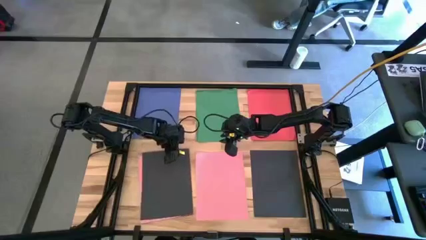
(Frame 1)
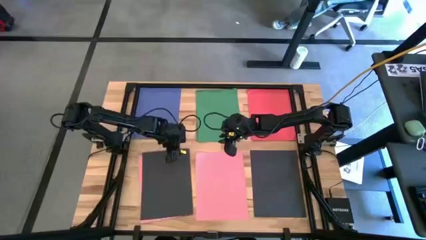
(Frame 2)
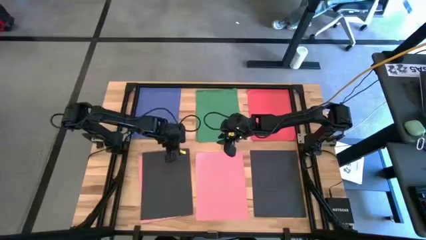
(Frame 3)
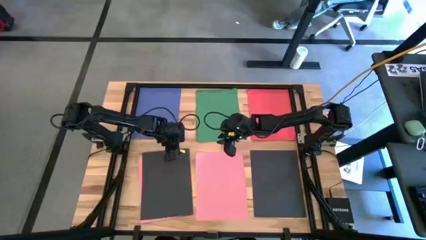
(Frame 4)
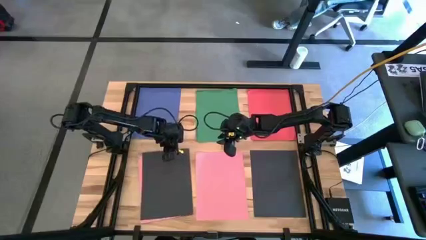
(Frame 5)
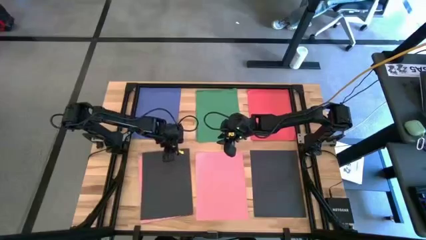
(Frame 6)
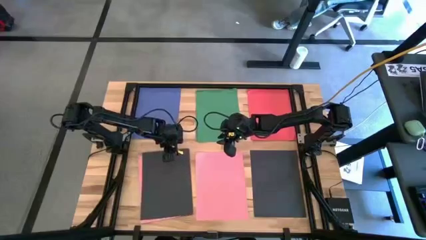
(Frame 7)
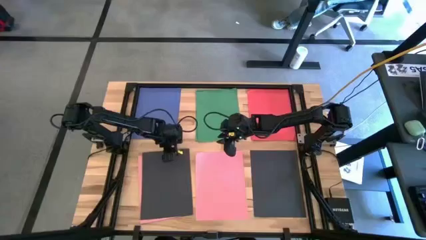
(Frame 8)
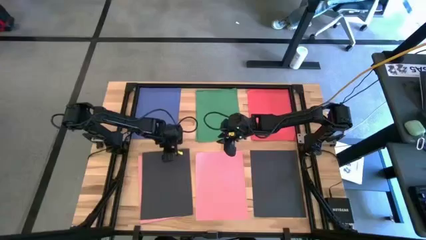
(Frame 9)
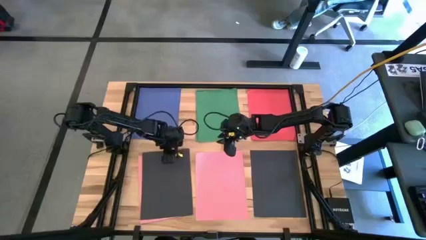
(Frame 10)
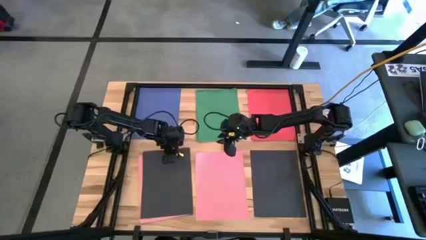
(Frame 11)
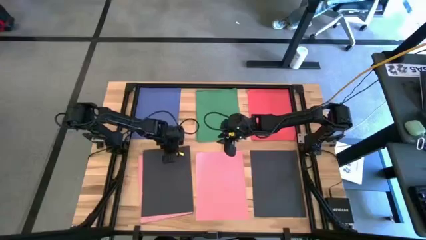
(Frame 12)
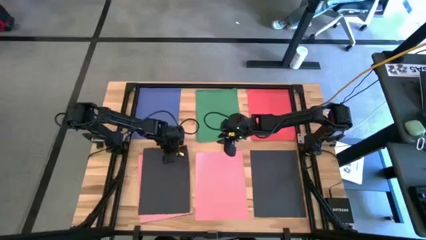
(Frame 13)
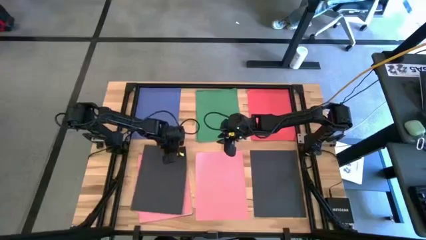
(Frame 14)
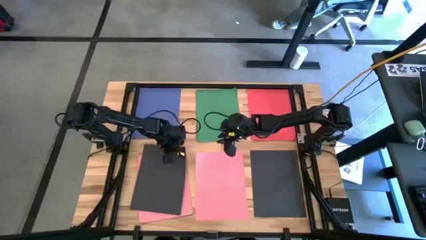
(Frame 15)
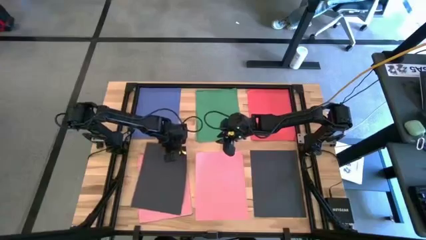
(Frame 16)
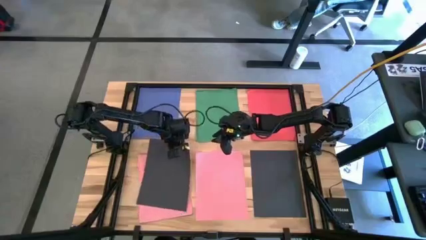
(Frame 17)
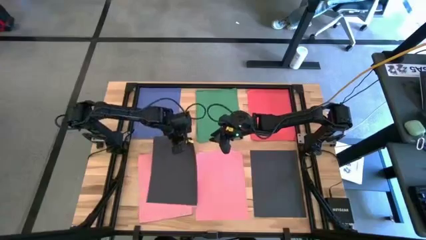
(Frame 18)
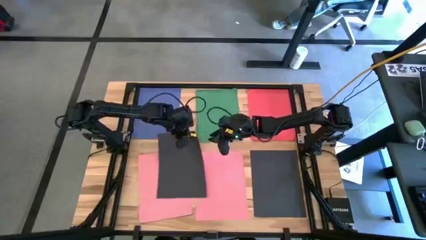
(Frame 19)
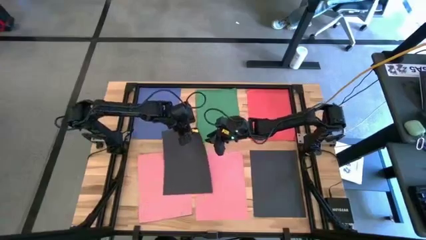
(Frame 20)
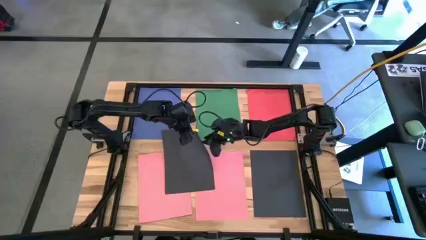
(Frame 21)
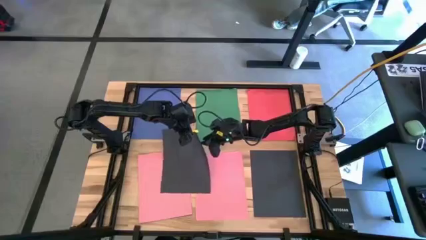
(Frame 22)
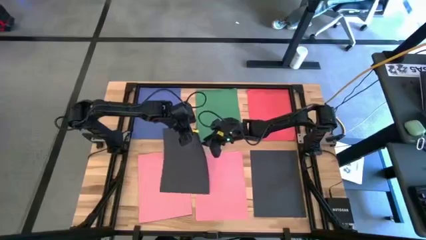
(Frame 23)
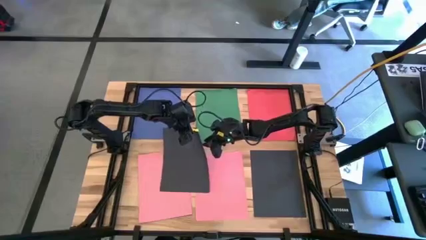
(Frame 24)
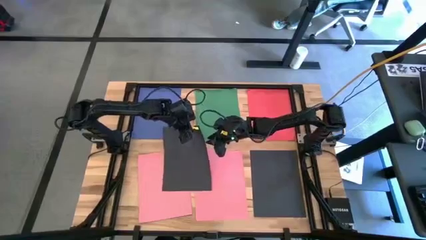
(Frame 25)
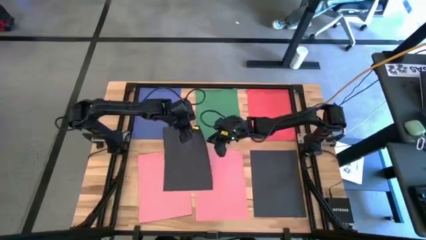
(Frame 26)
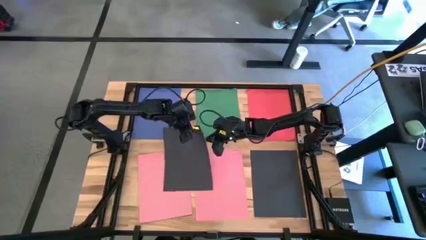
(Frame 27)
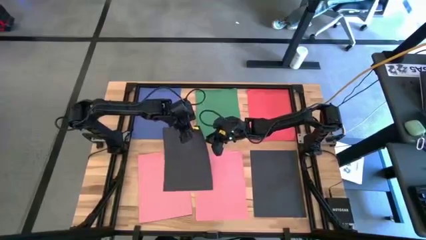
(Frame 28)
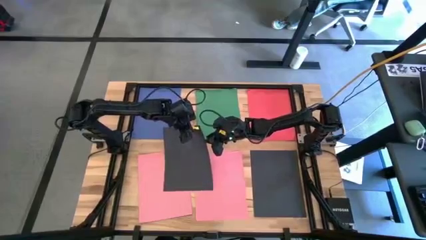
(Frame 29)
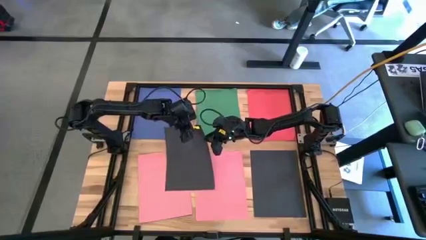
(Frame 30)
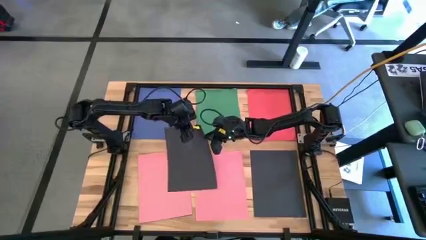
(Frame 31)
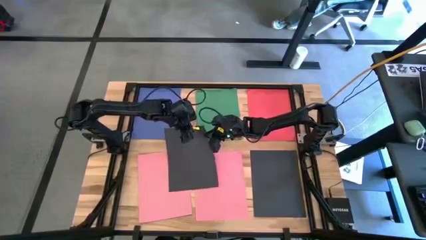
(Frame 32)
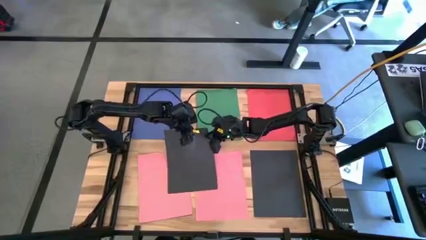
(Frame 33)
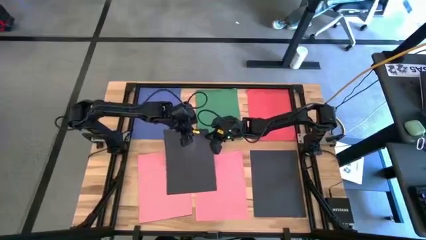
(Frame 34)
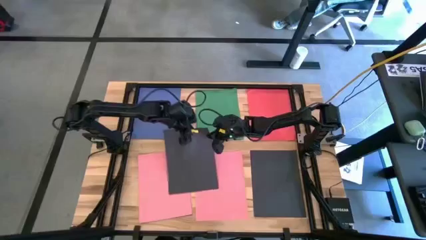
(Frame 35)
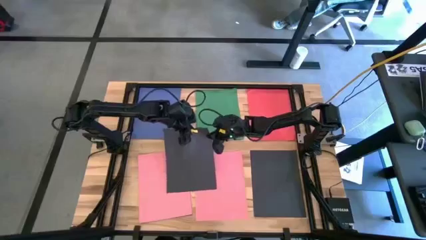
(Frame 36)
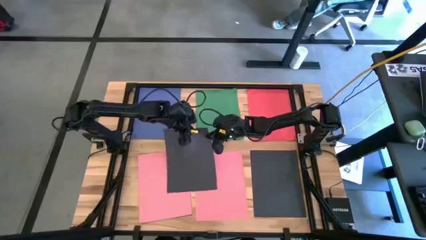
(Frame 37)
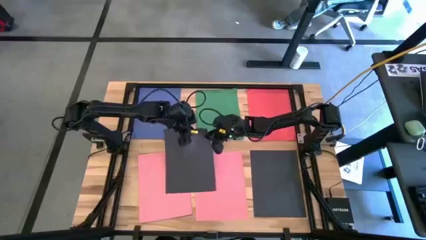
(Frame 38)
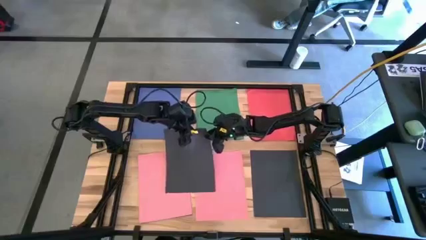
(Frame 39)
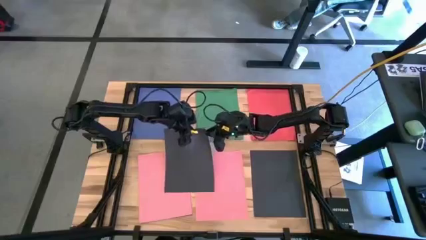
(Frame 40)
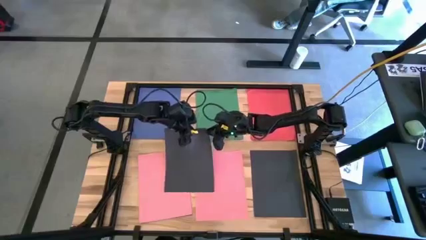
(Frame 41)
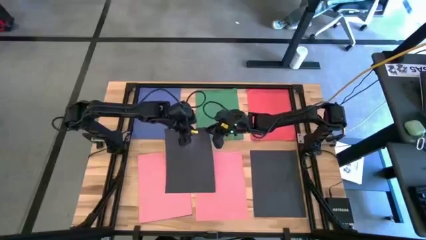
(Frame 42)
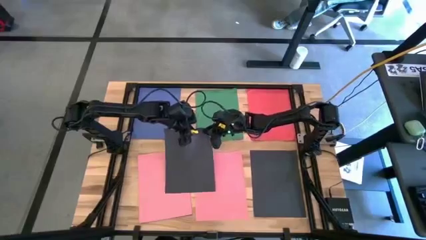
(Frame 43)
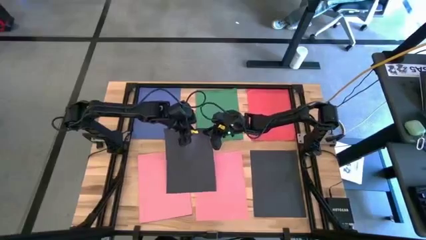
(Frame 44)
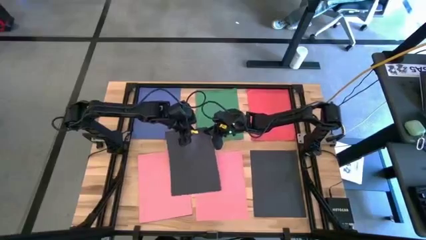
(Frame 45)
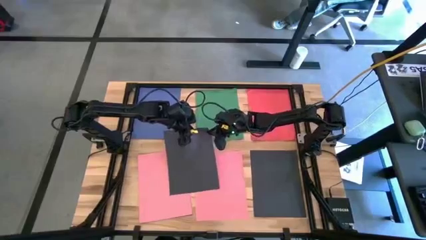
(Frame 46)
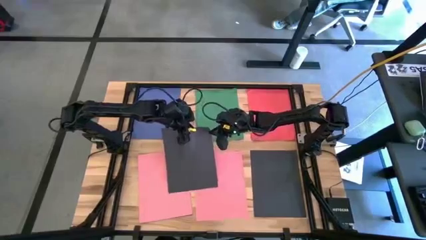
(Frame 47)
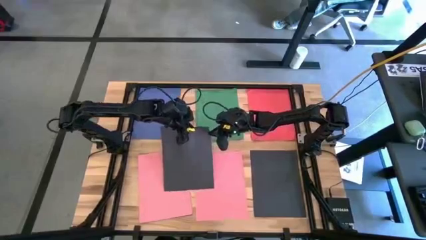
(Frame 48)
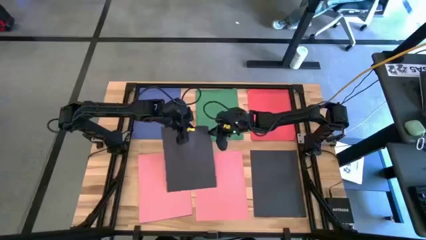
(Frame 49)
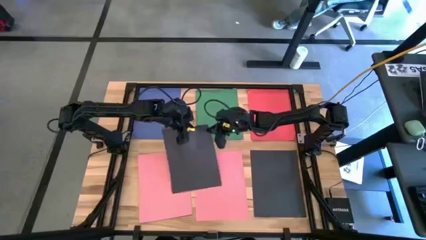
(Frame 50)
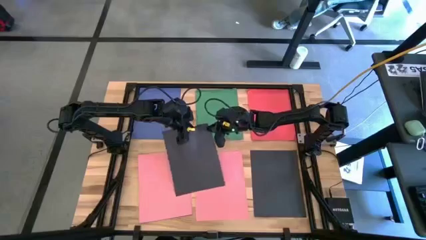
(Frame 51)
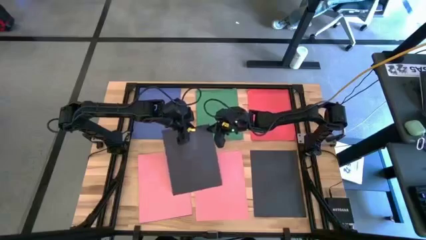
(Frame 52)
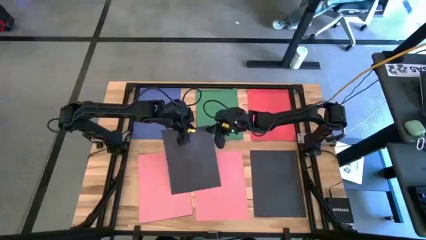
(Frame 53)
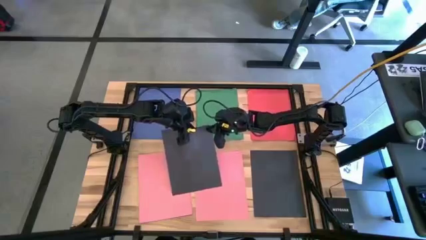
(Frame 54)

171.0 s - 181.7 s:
Task: Organize paper
Stack the black paper on top of the other black paper

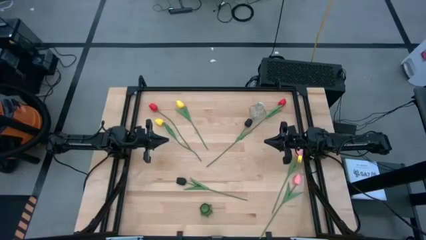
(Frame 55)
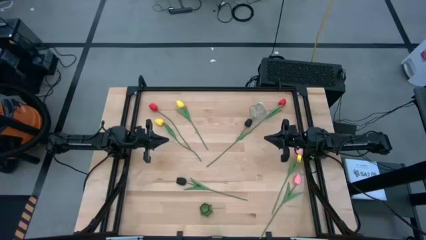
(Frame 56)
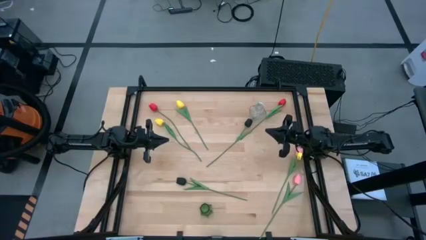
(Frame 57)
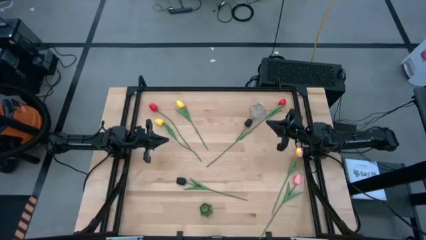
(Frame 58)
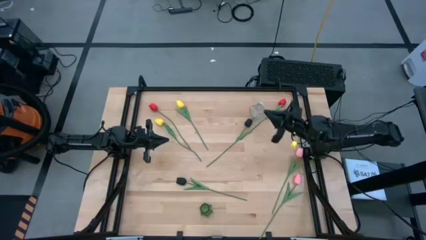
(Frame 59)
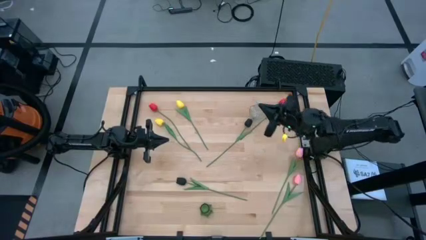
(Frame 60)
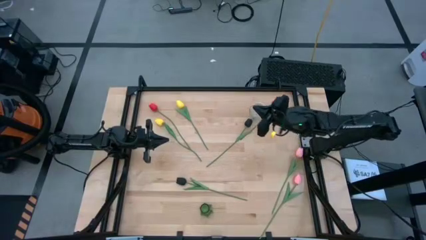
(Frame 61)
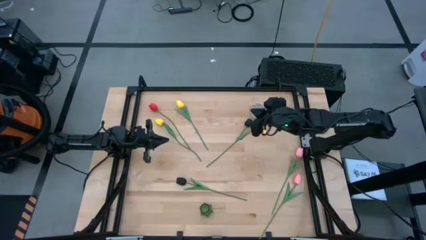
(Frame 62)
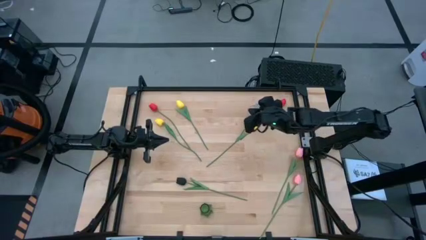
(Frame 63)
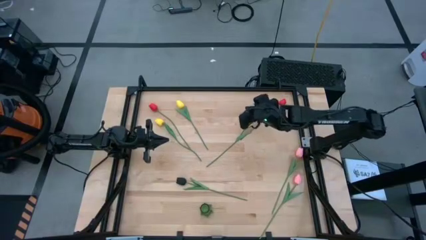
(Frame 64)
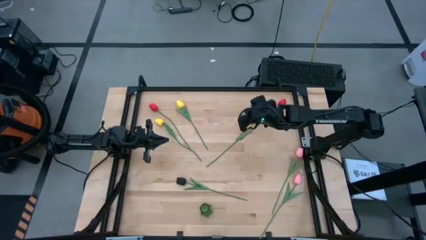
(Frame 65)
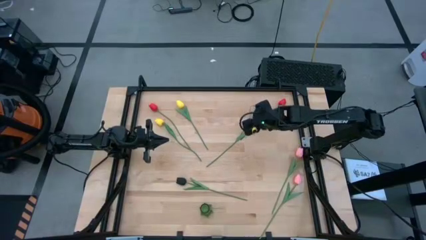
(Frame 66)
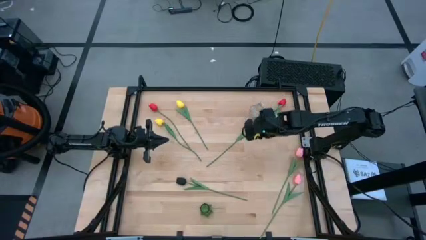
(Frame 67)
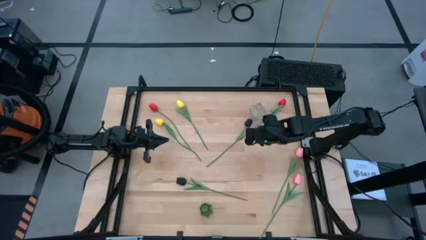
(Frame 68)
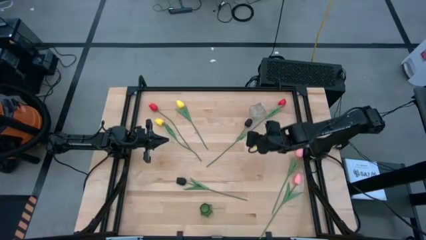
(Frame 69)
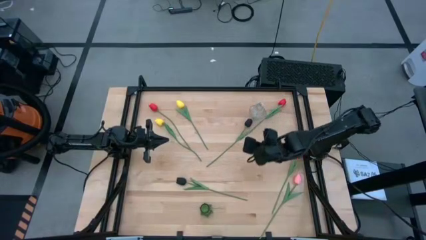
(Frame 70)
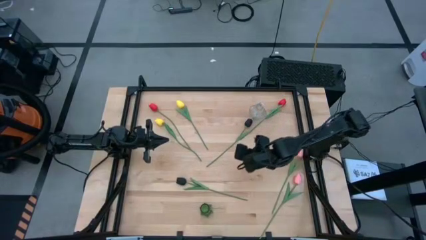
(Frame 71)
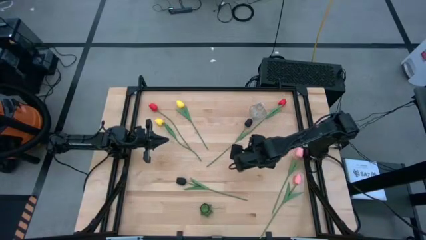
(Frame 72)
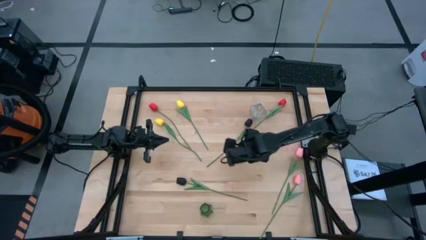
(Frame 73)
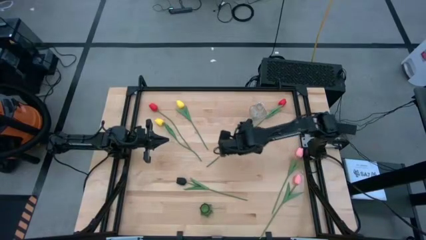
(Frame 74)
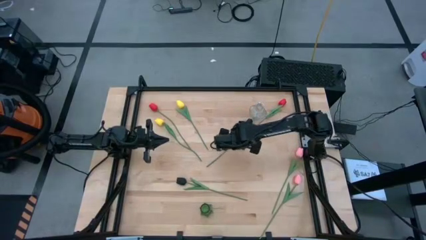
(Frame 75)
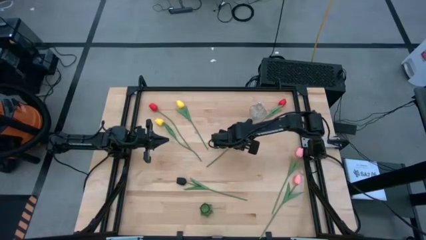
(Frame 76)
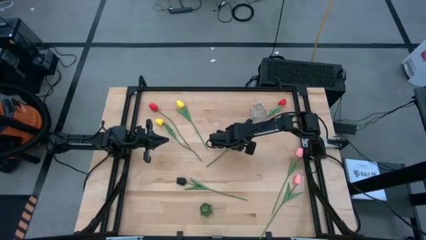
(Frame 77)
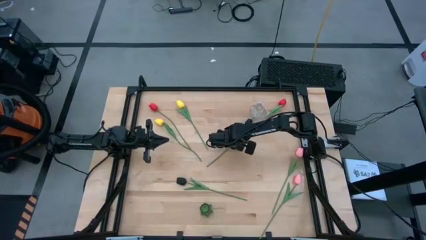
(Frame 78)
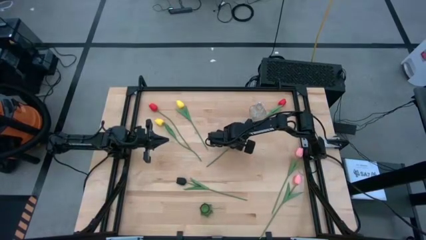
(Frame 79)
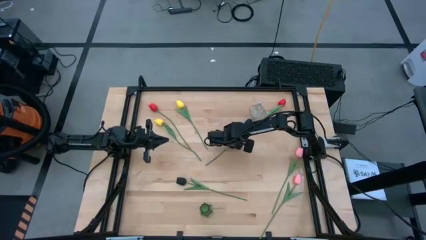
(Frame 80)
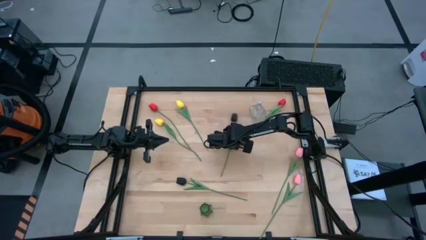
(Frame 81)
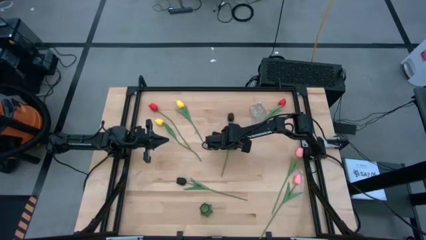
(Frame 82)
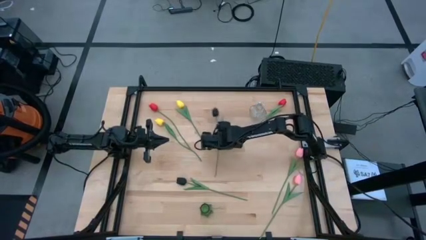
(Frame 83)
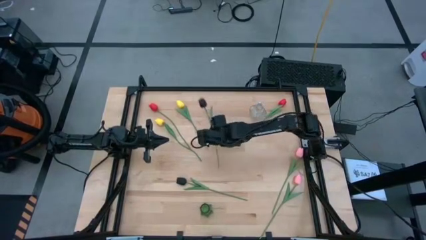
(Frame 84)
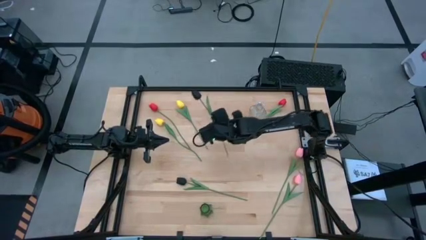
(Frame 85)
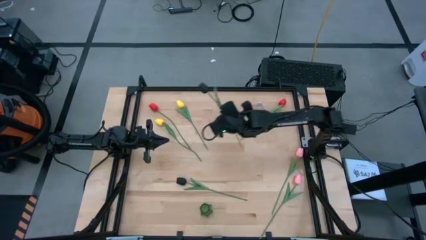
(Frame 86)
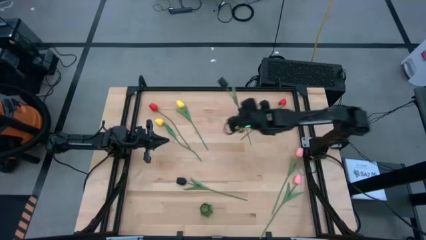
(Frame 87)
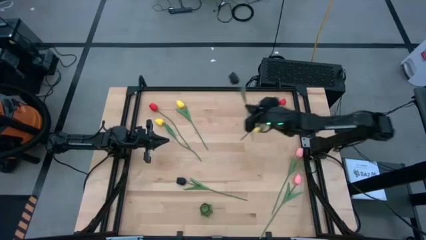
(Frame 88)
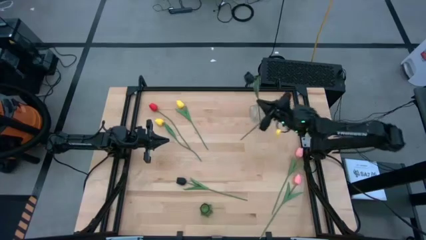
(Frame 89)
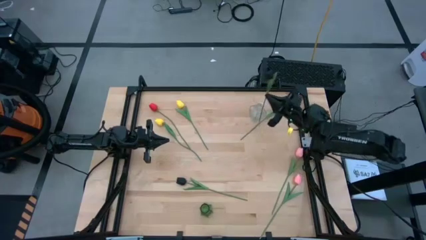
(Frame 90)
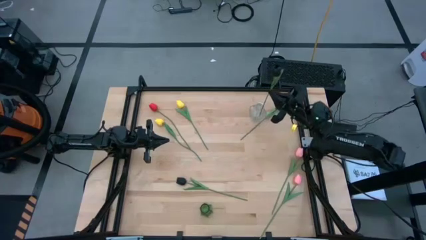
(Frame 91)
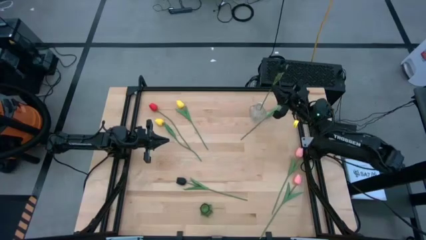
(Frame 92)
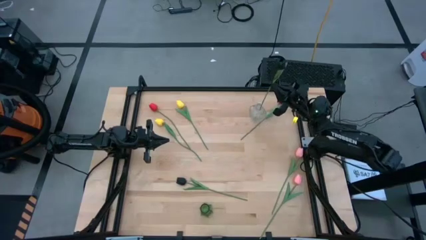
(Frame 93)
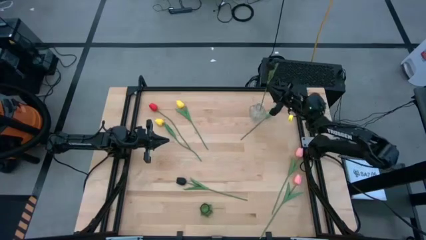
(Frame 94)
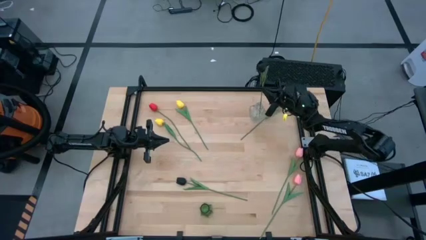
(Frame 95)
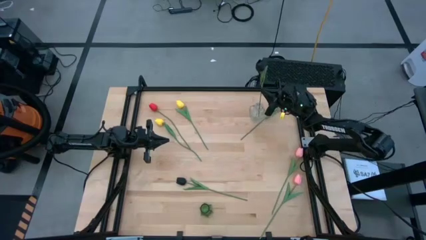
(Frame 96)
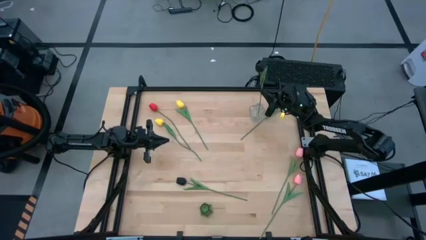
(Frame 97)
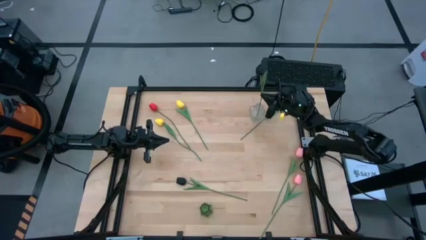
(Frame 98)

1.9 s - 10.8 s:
Task: Sort flowers into vase by color
Put the top black flower into the transparent vase
